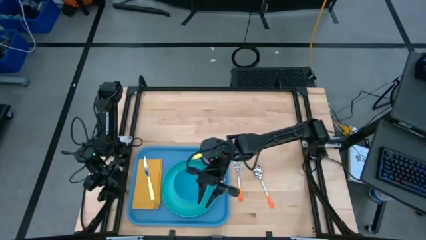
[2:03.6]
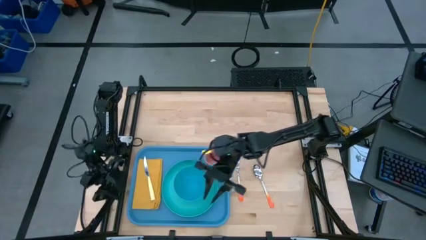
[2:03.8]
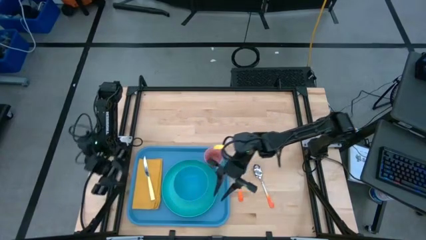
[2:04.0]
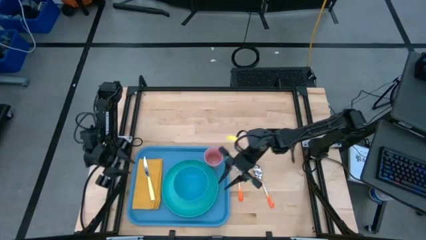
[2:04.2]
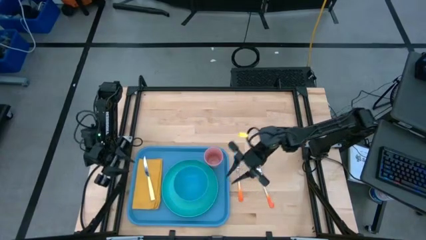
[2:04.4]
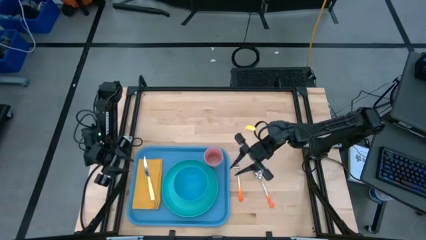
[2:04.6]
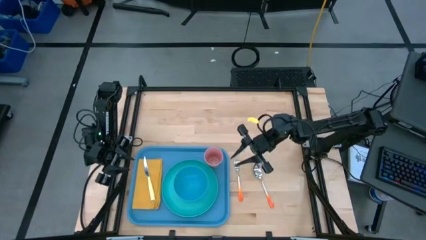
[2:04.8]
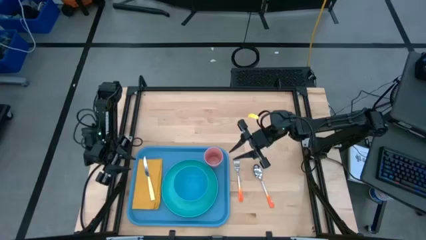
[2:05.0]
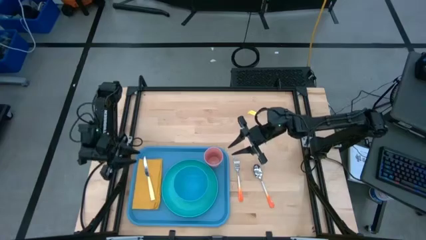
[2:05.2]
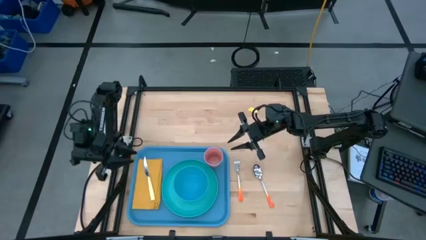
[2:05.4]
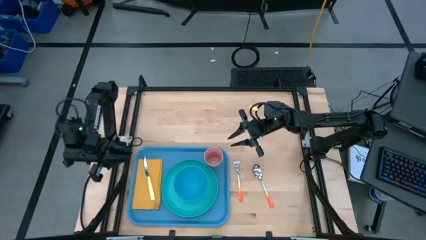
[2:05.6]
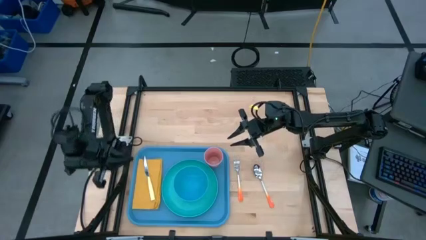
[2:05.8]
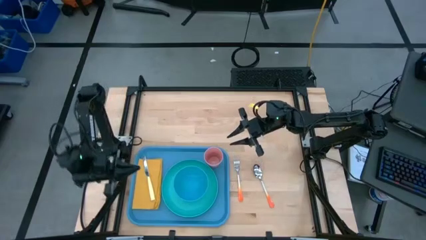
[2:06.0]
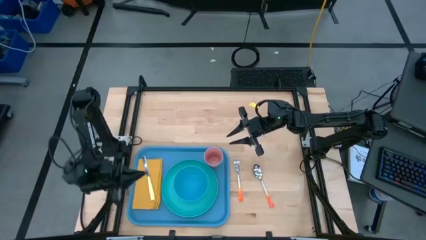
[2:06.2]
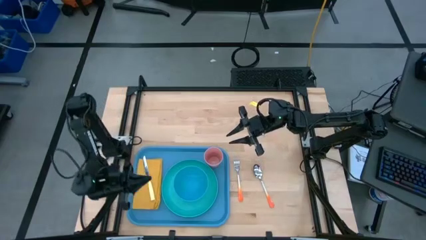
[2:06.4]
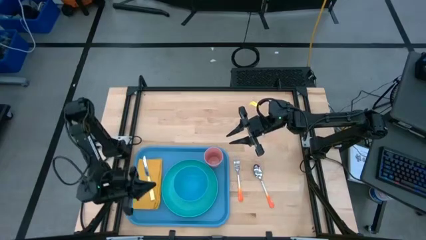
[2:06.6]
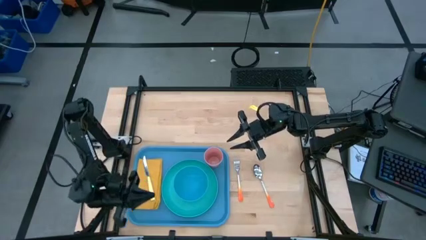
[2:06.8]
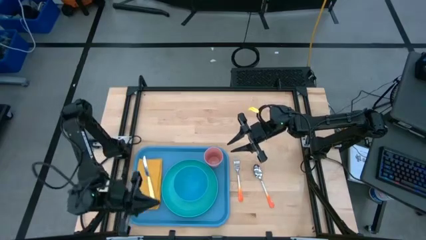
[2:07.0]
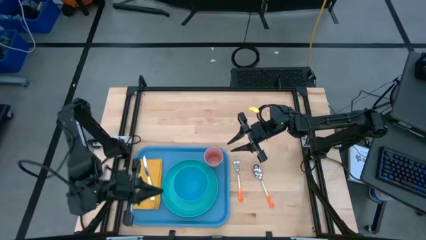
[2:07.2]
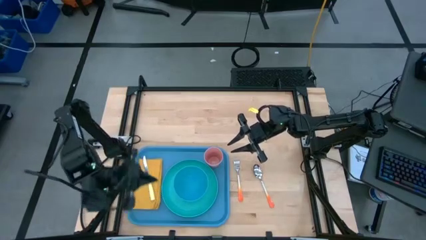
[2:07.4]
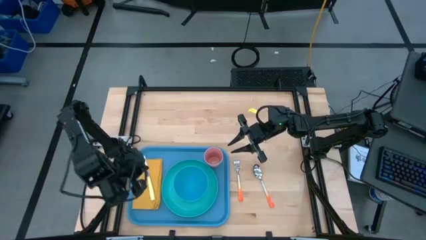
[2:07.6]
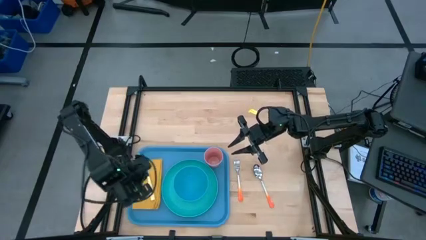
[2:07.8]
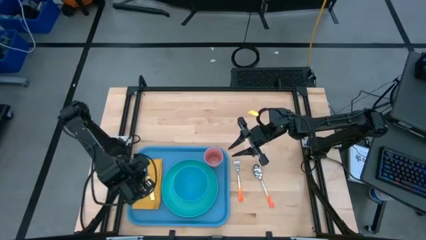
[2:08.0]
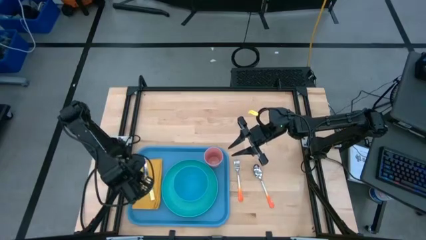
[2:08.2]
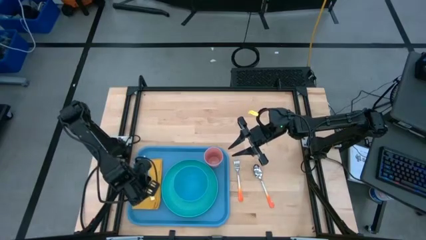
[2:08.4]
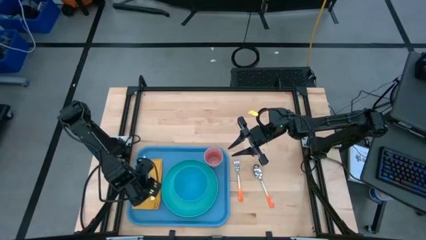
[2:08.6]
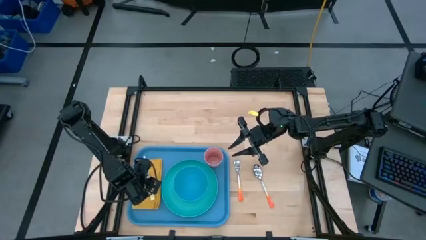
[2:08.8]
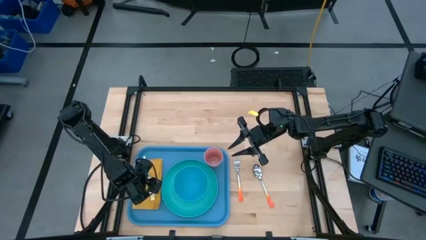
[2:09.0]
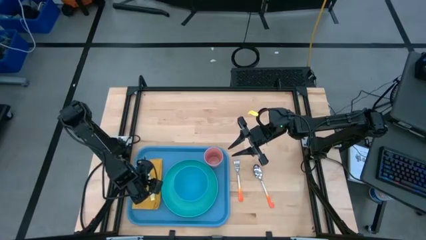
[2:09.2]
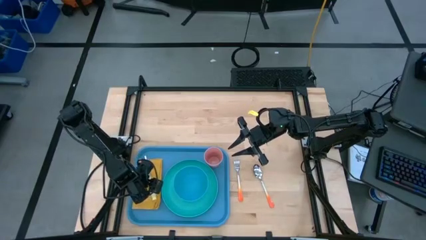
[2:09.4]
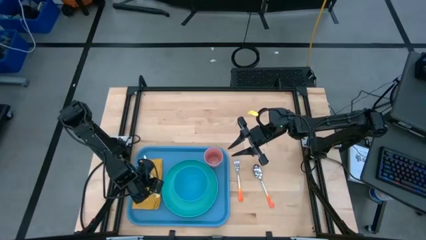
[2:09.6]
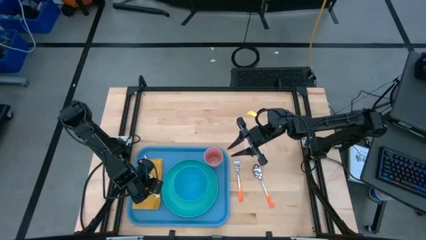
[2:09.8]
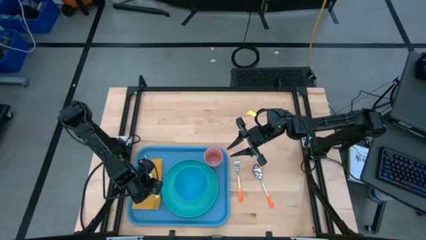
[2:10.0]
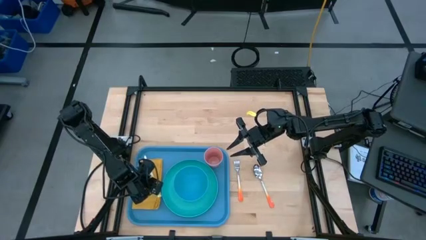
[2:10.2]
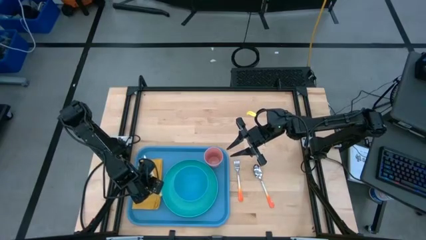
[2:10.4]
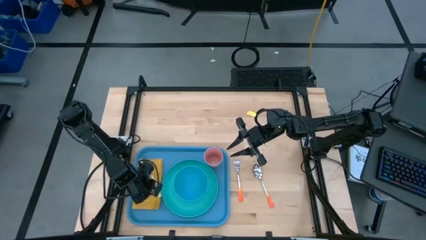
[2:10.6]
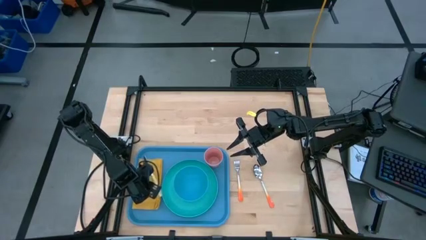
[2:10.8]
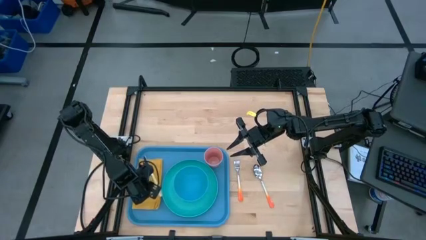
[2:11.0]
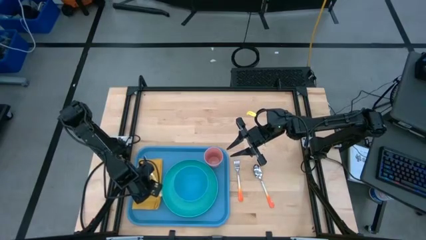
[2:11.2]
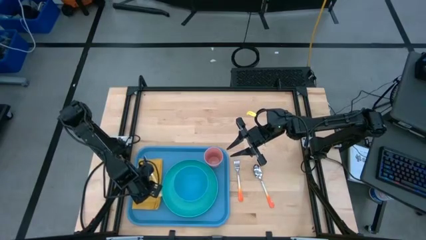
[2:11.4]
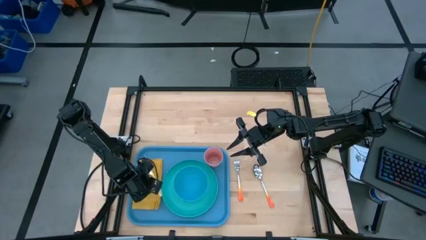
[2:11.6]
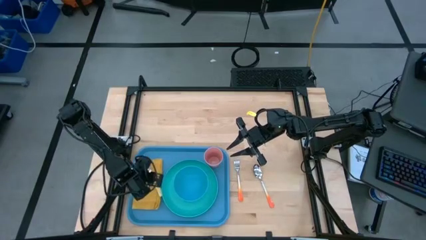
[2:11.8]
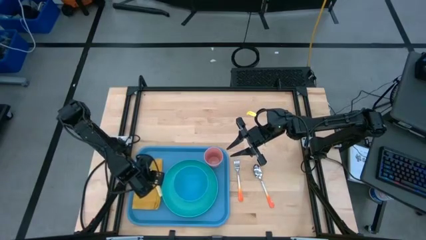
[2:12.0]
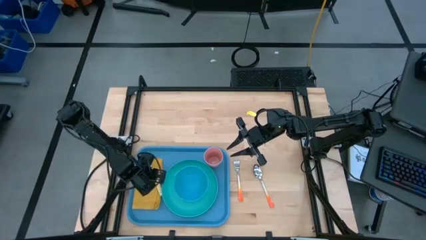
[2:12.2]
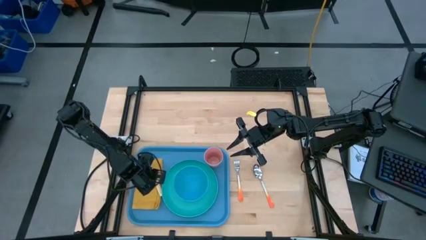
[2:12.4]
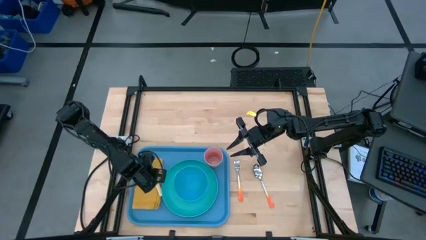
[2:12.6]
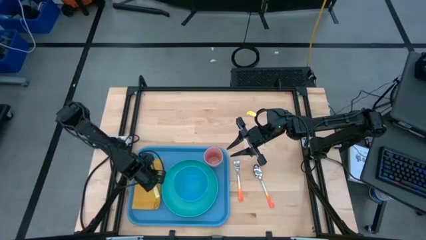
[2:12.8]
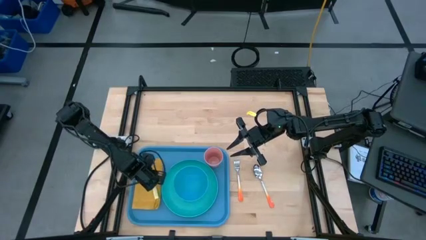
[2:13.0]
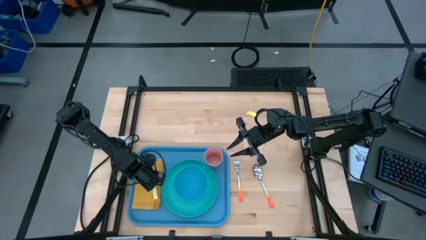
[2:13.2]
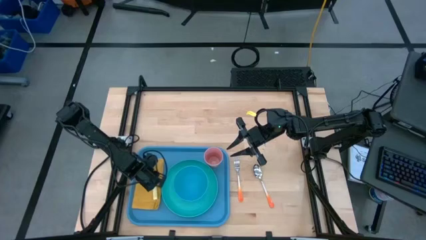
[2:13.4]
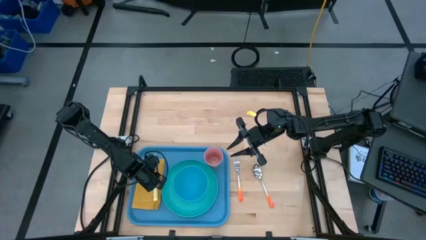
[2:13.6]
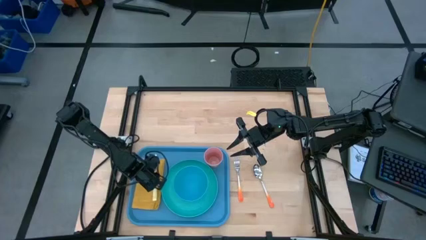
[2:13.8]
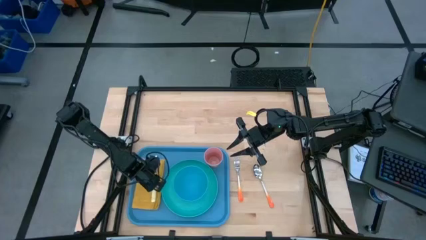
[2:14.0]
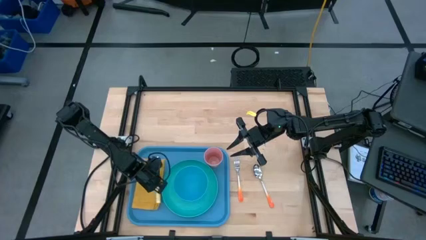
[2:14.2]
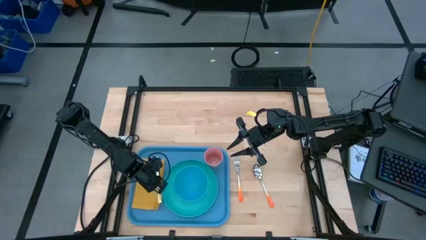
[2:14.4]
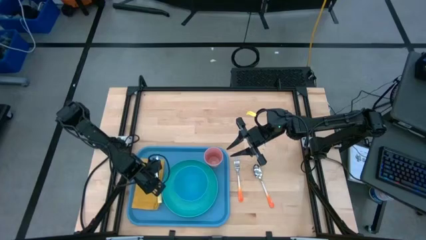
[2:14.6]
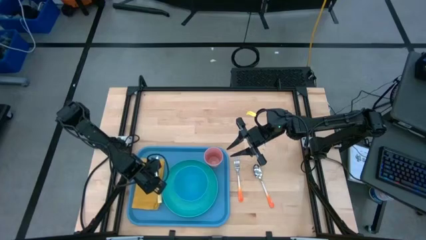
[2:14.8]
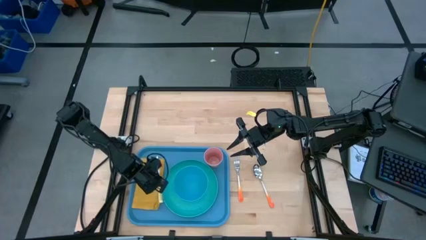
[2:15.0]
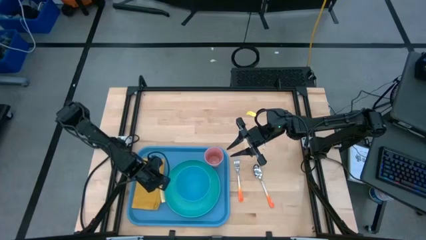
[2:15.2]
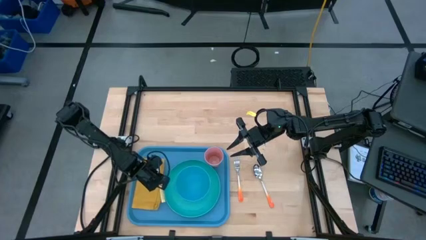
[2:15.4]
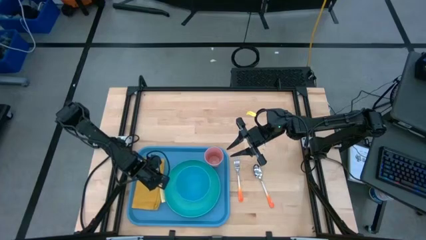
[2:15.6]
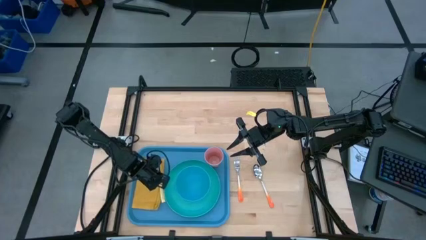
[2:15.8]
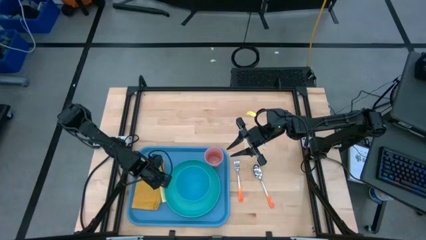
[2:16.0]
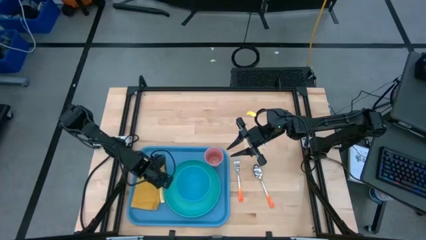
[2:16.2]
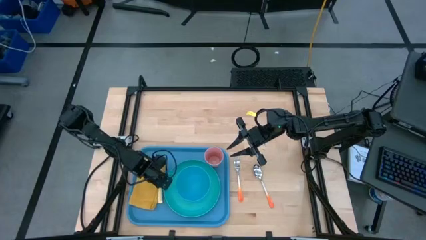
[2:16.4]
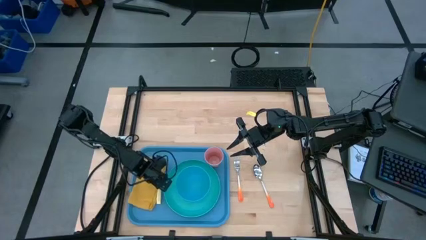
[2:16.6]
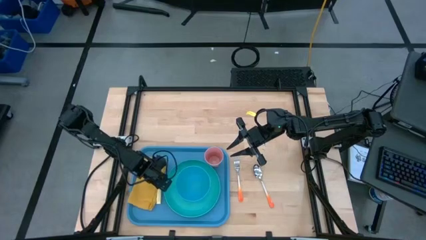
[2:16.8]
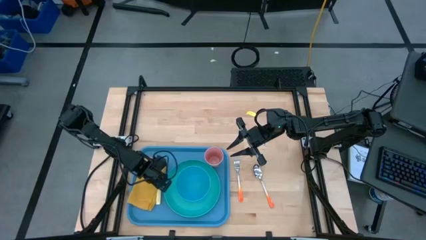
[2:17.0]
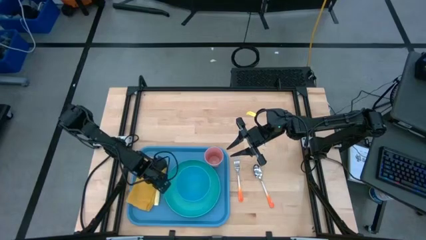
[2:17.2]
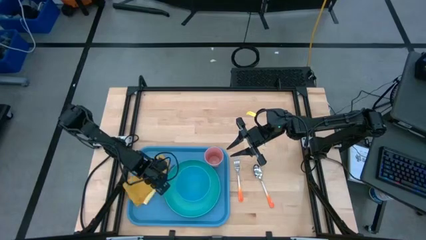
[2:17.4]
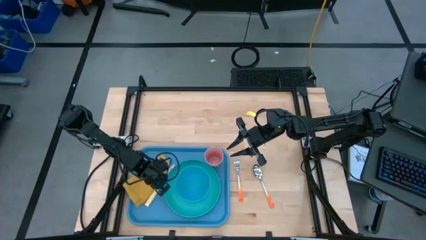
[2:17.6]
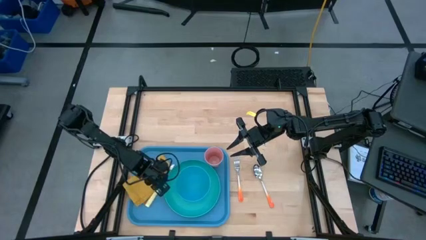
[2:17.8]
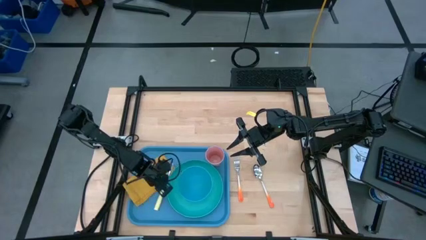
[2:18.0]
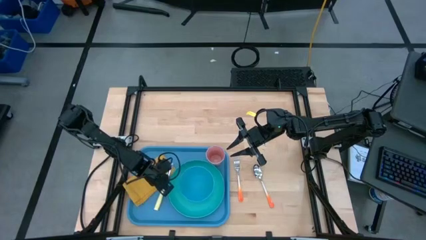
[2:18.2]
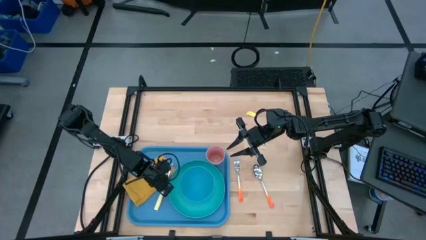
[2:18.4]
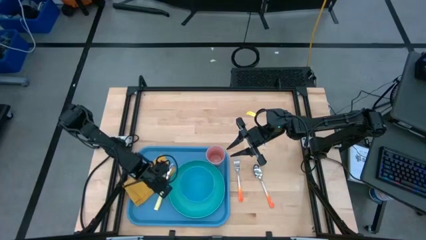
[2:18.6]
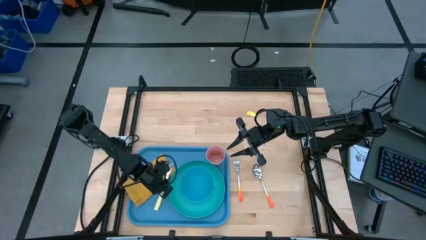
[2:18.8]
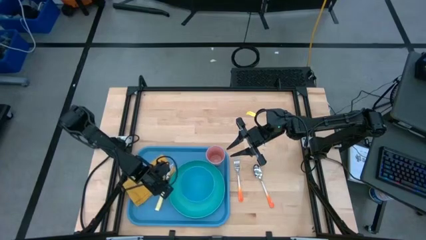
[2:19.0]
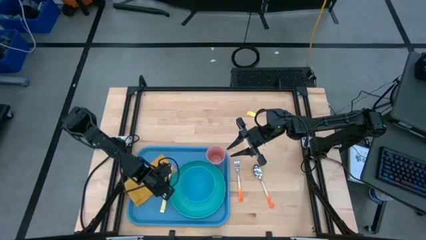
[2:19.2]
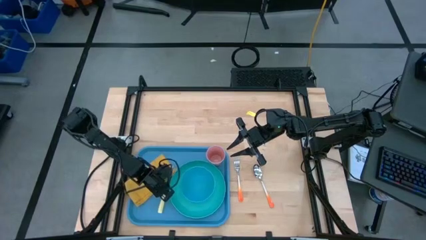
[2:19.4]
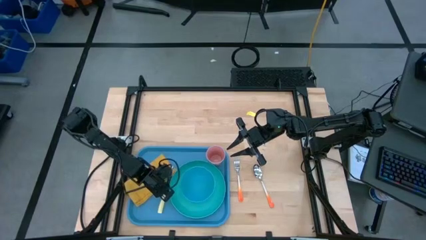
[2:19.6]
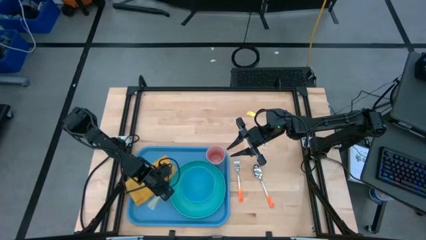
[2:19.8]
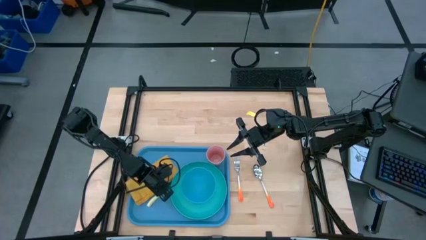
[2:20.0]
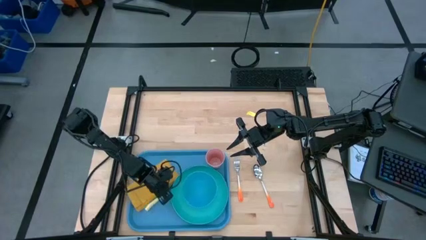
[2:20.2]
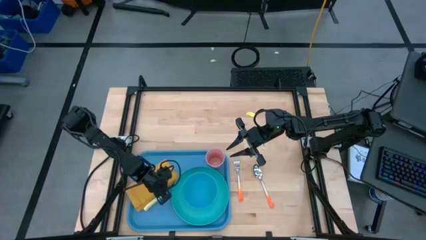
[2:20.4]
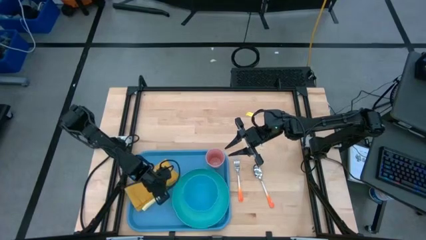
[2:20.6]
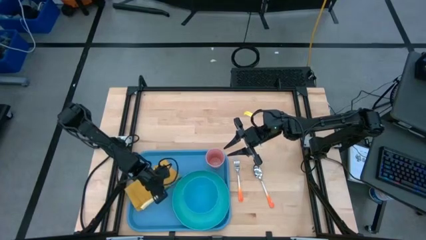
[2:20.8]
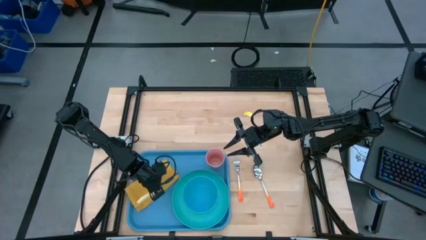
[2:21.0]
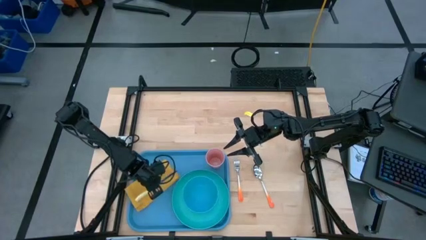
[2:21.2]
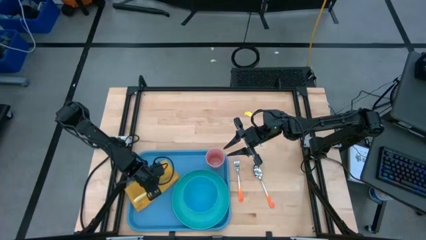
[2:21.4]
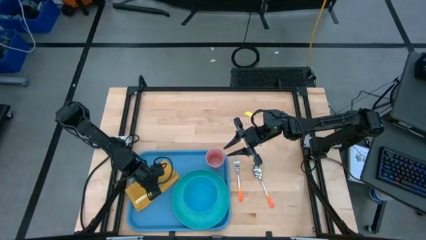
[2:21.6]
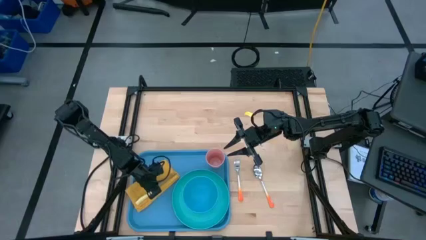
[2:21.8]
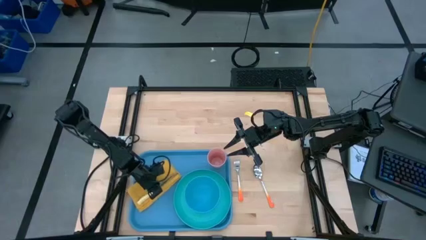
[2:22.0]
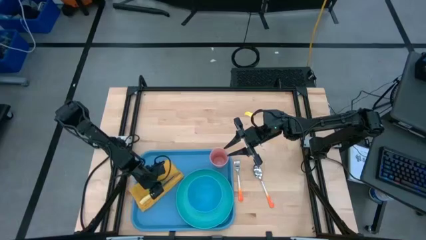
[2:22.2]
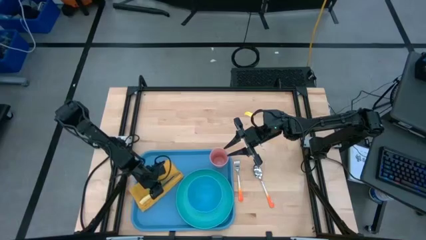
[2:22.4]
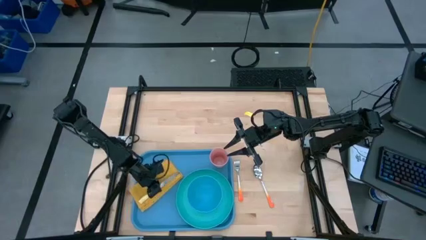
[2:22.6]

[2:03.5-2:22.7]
Task: Set up tray
Put the yellow table knife on top of the yellow table napkin on the blue tray
